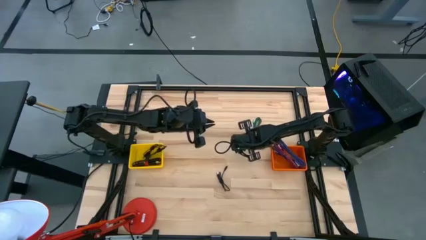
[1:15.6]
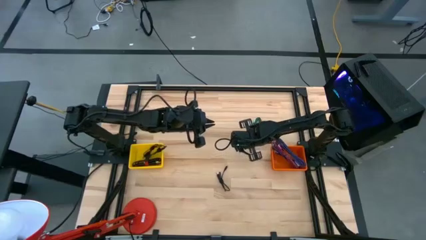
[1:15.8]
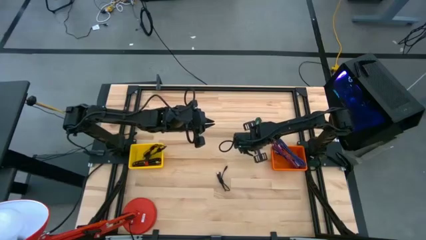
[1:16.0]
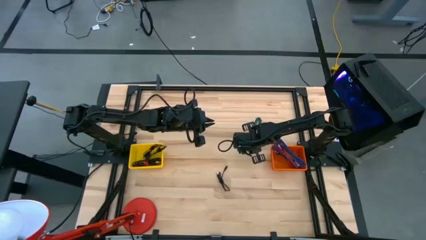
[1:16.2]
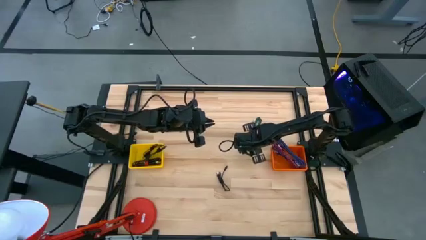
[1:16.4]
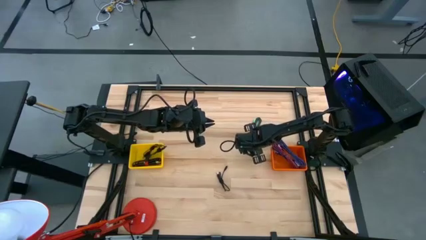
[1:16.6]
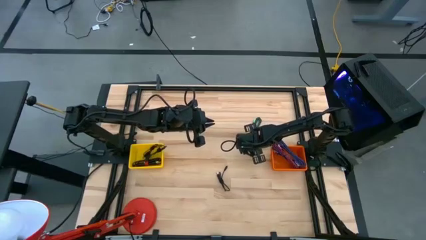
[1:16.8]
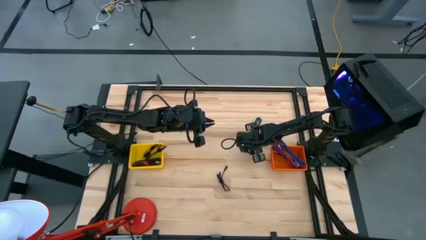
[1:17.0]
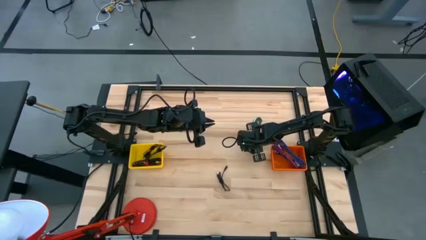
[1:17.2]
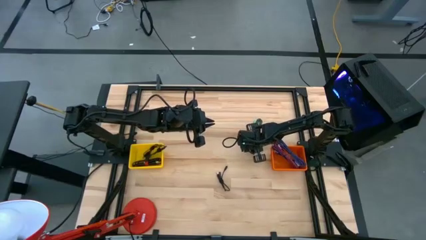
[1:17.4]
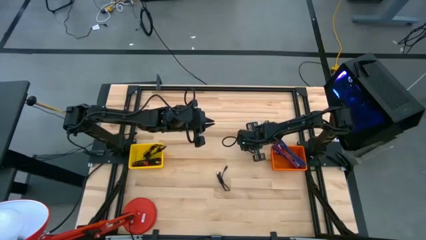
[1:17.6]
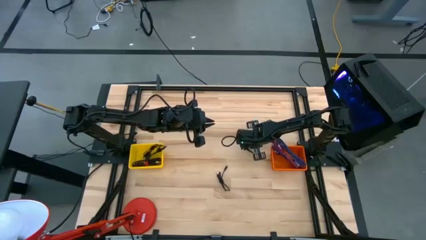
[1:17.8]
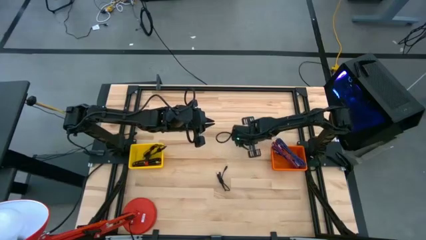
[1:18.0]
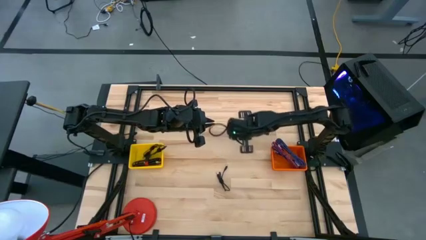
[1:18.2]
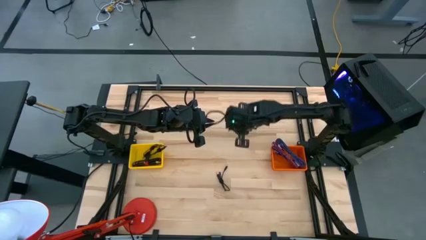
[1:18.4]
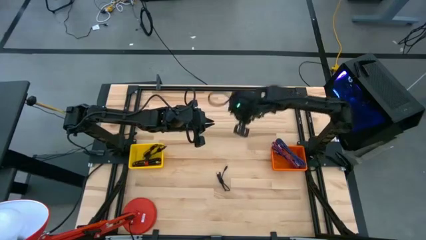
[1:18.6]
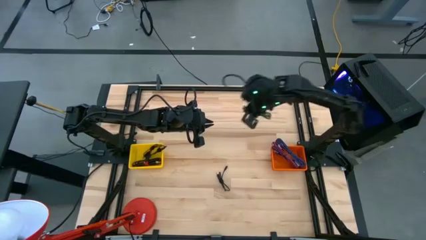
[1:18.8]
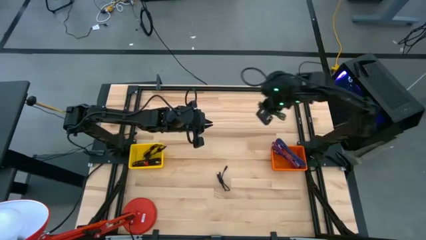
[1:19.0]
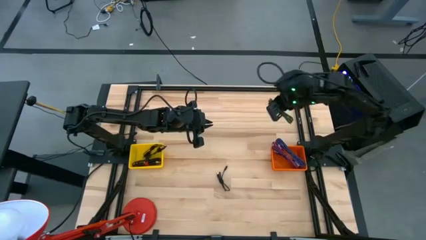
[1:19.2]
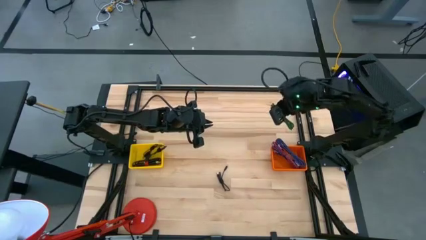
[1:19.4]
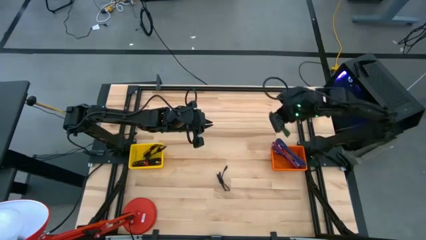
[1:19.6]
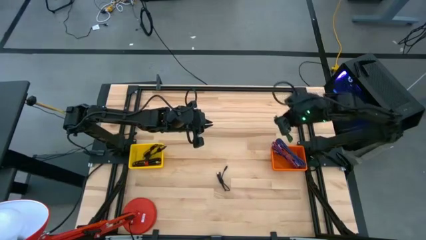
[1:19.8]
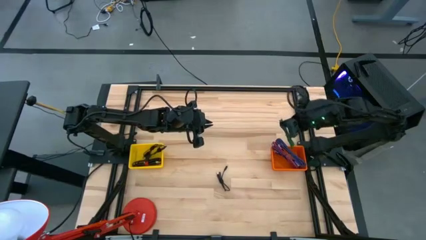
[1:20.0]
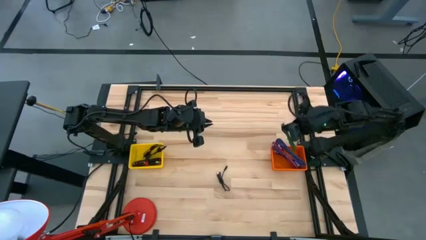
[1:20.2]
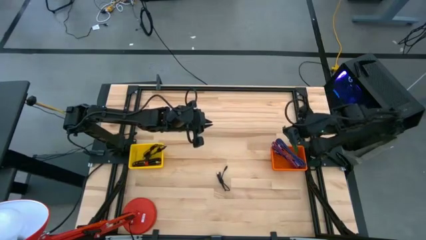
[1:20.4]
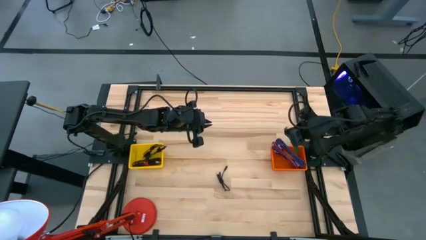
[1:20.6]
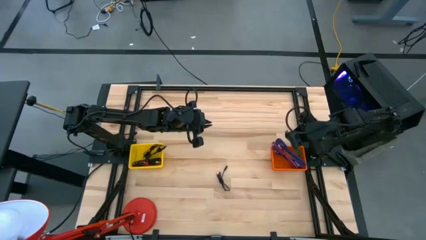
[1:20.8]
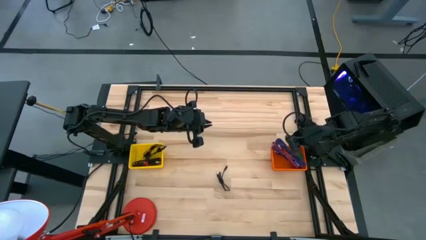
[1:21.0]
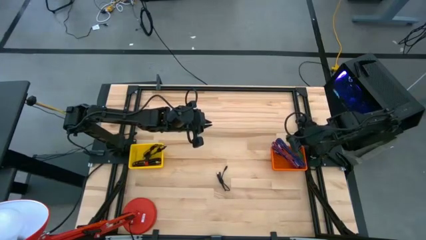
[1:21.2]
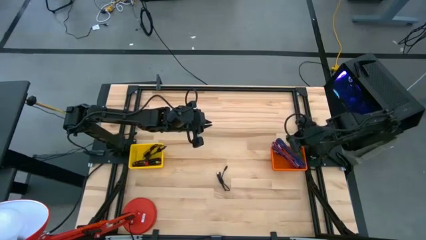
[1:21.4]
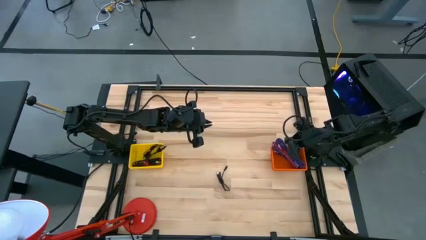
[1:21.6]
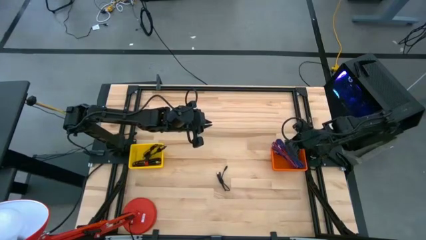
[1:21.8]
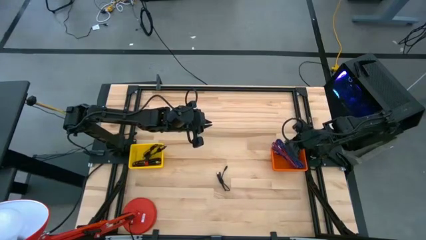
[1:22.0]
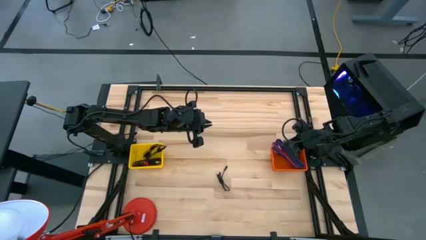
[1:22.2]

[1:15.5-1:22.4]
Task: Pick & Place USB Port
Put the green USB cable into the orange bin

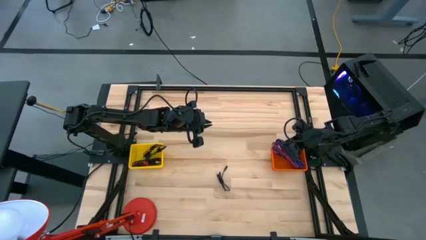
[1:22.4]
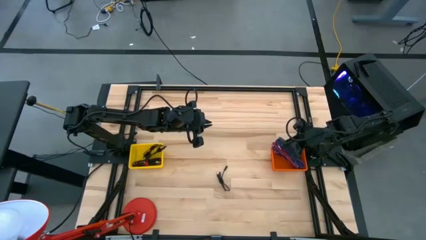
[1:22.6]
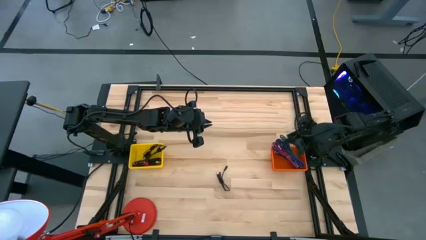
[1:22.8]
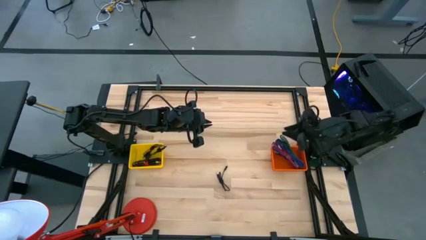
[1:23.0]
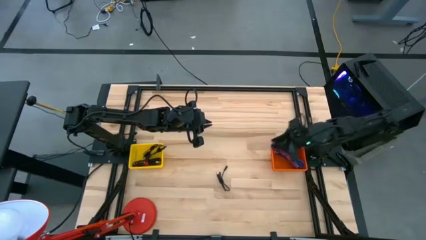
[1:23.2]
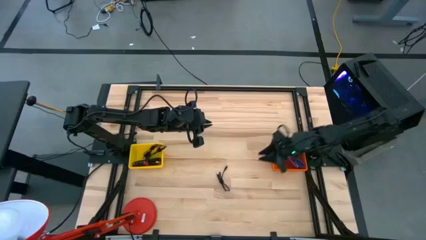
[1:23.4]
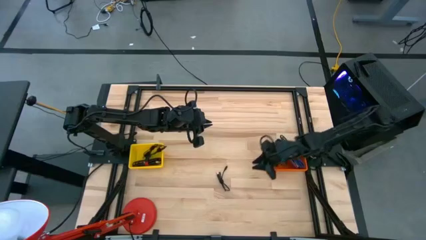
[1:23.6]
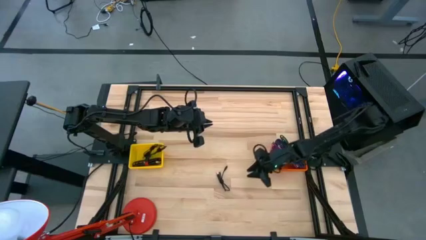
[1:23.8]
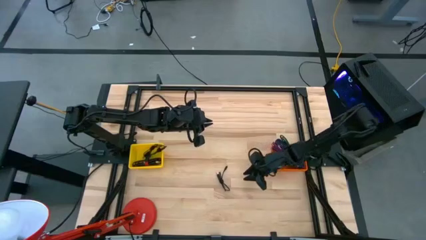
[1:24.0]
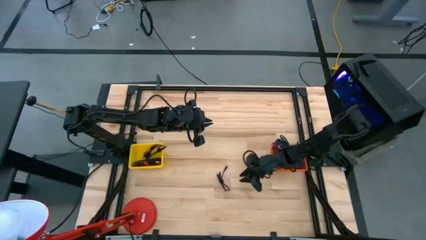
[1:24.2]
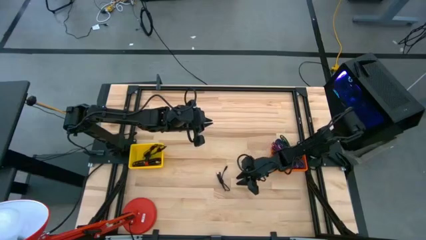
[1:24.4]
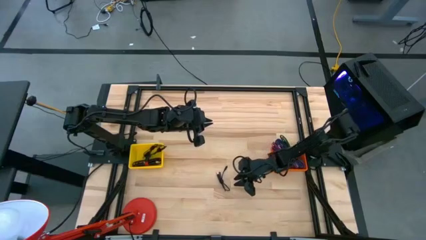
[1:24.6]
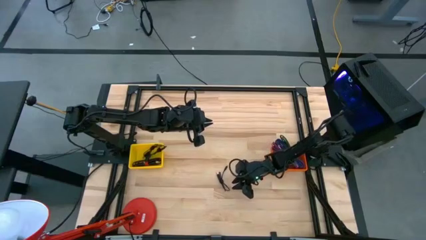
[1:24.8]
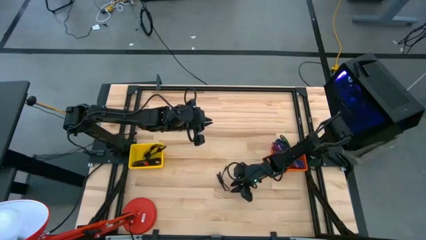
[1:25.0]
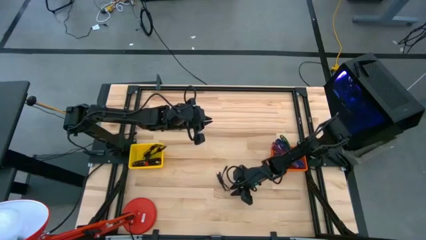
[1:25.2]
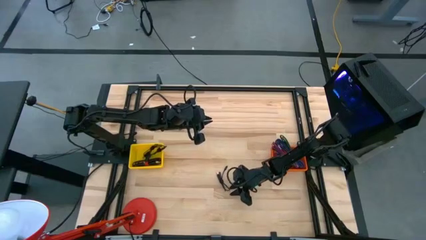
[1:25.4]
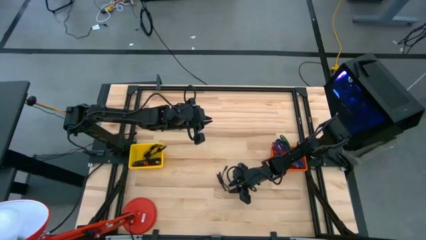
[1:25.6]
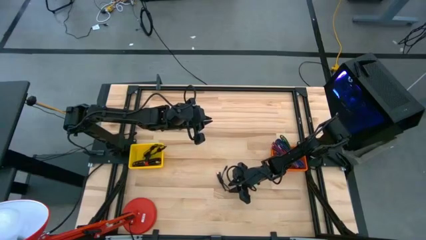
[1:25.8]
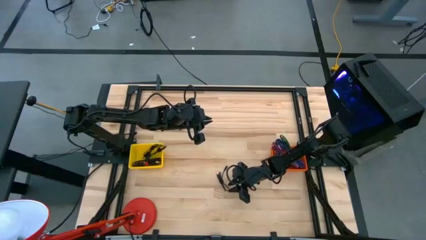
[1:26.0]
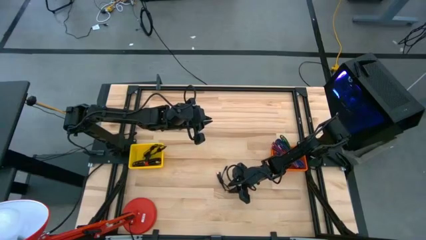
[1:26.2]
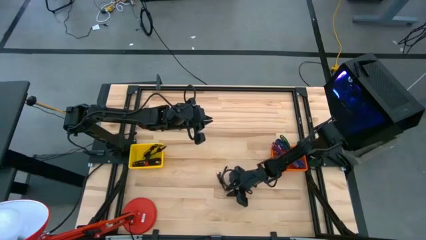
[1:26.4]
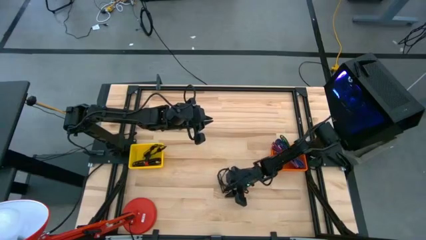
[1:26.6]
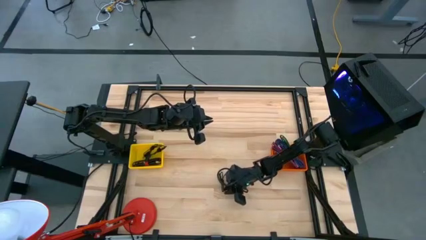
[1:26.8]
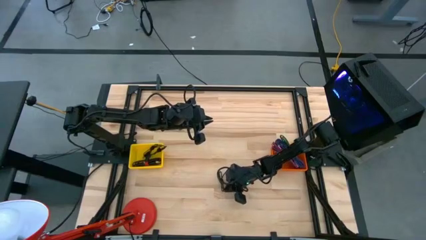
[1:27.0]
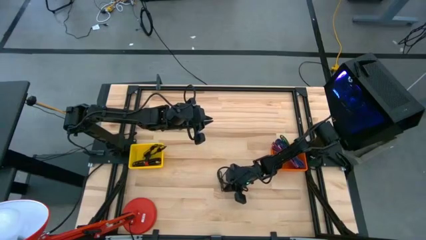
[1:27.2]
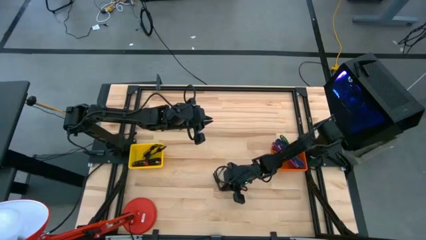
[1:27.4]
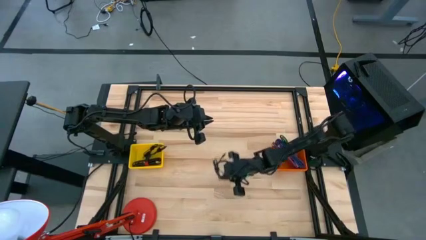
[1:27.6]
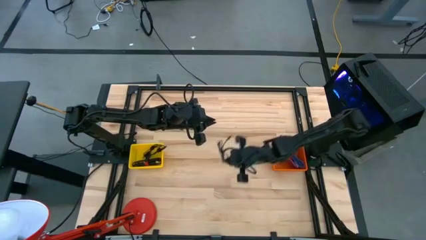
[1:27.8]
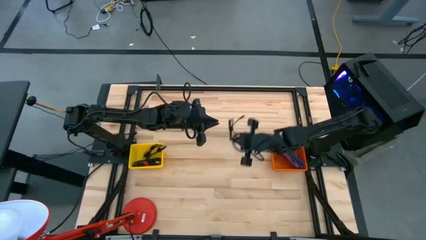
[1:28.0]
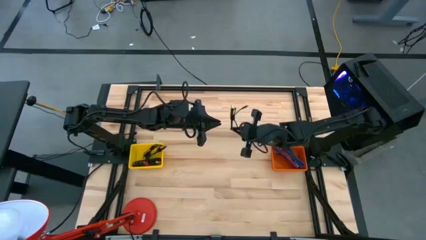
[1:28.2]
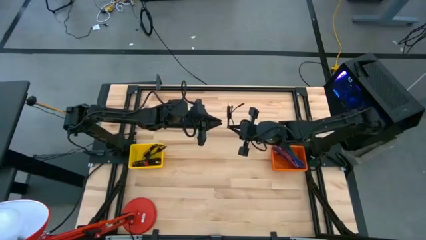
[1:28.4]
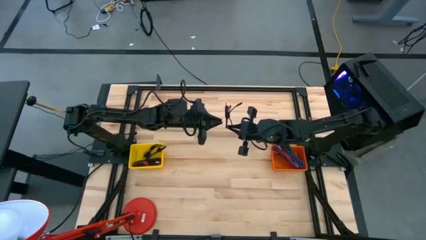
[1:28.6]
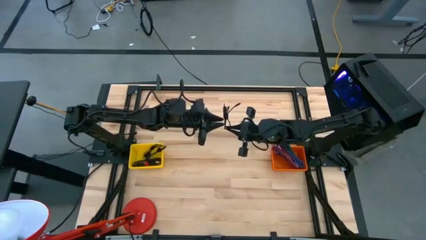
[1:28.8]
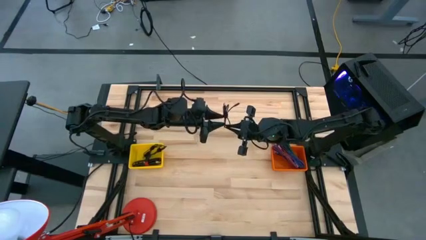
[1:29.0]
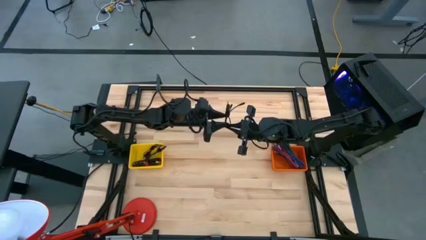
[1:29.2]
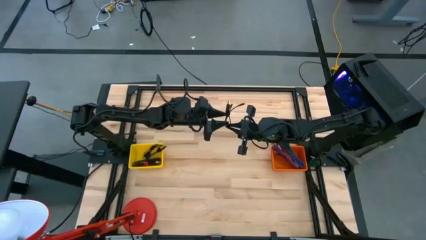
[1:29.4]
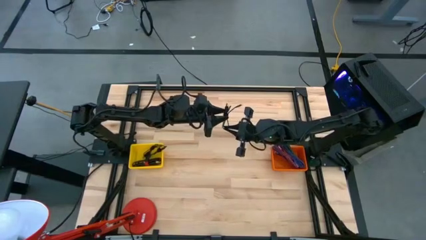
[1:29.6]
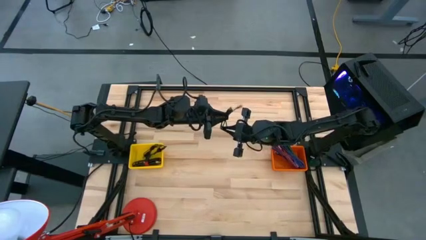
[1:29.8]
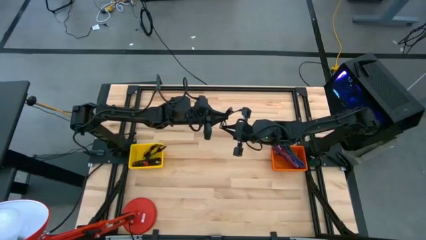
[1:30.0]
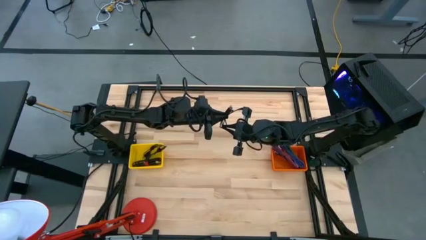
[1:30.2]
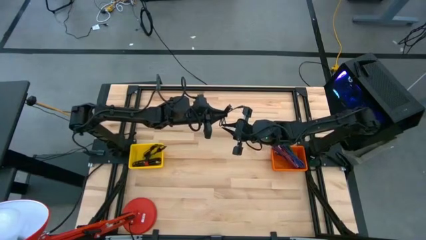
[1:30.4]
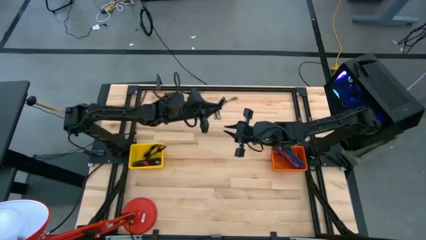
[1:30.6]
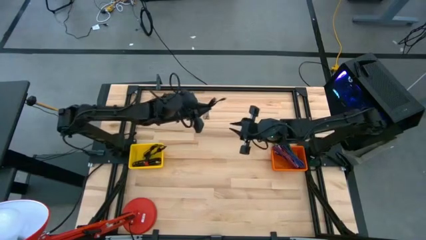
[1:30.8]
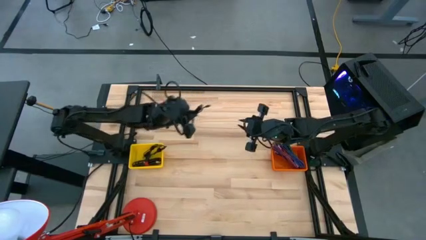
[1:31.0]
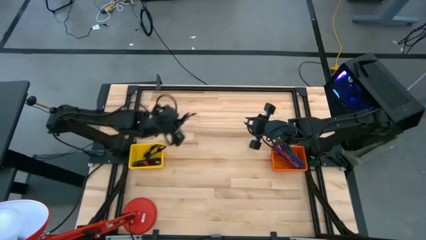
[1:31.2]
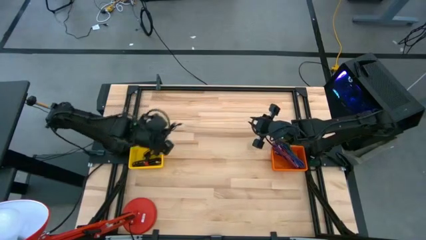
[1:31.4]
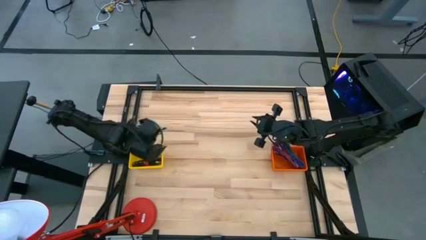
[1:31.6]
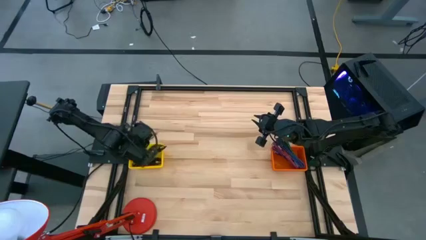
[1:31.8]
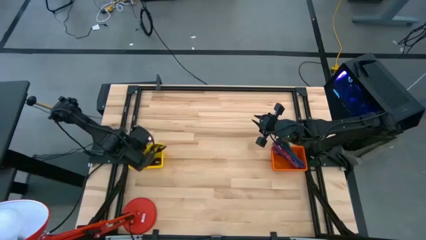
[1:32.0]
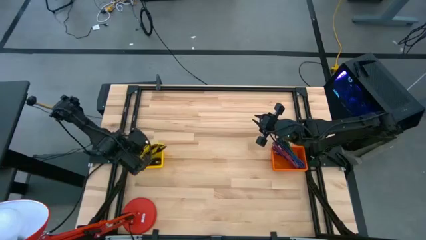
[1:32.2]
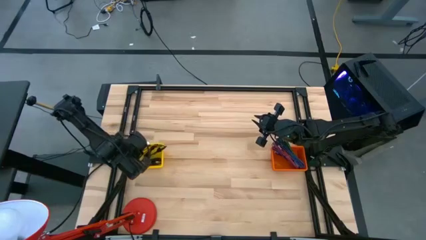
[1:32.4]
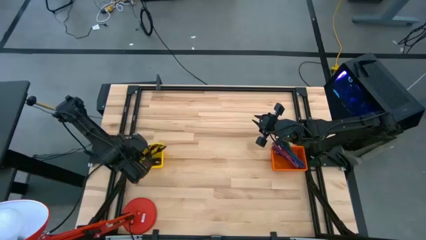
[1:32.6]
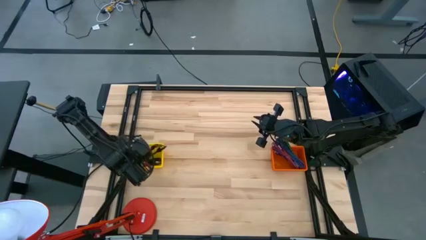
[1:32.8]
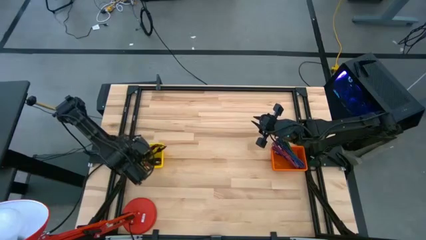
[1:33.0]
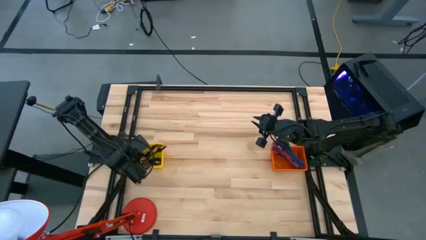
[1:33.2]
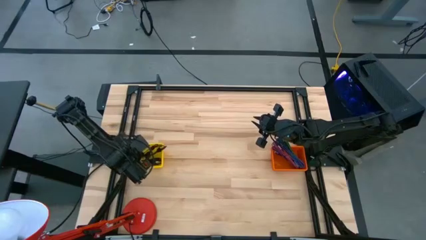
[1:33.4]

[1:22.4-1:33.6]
Put the black USB cable into the yellow bin
